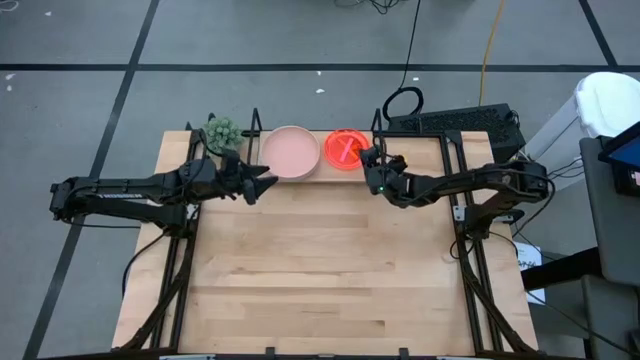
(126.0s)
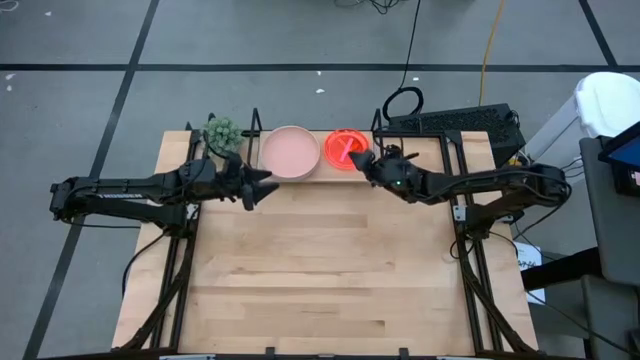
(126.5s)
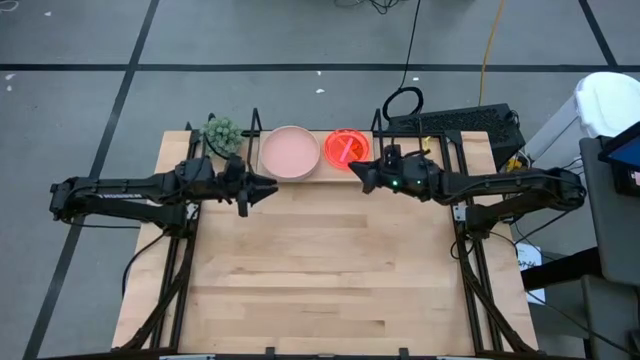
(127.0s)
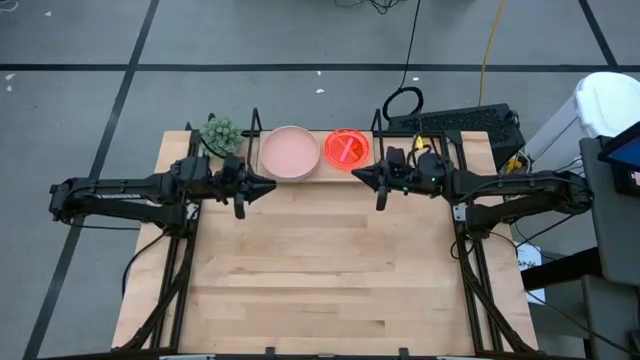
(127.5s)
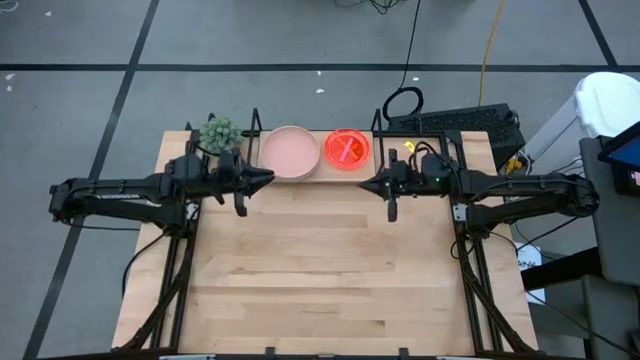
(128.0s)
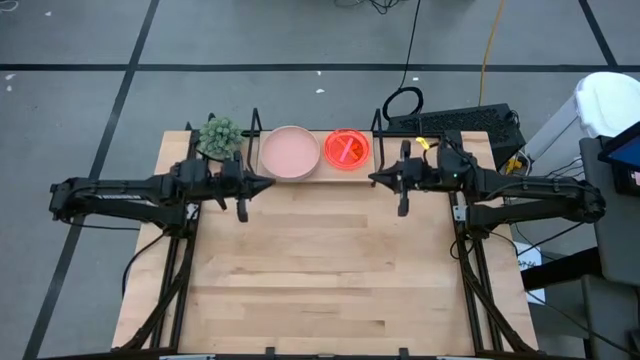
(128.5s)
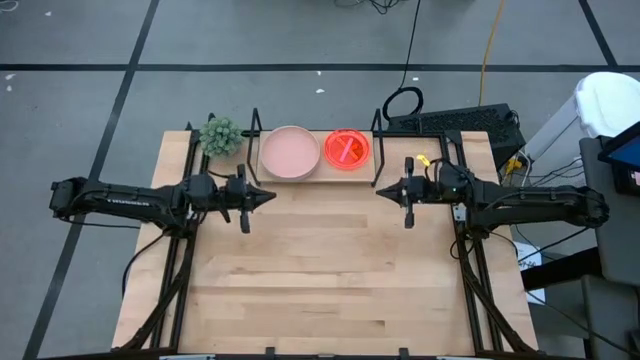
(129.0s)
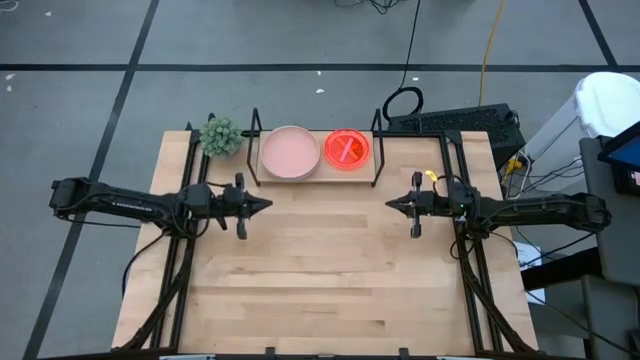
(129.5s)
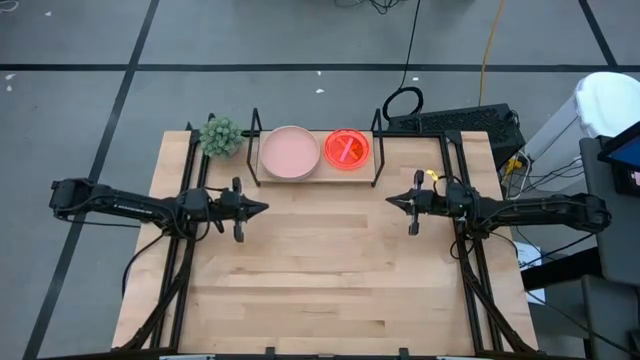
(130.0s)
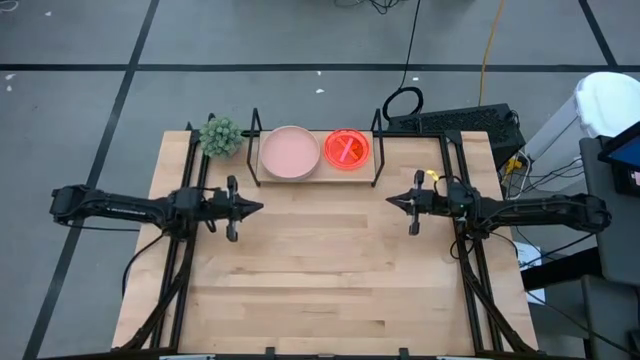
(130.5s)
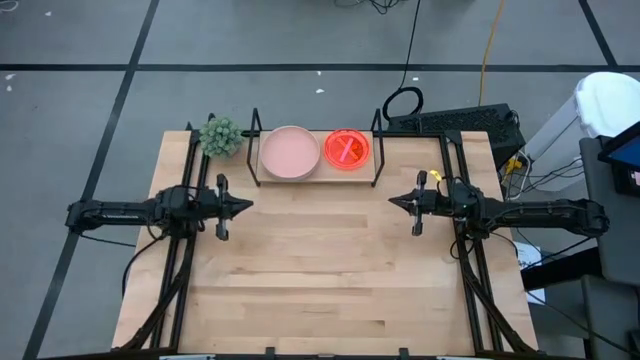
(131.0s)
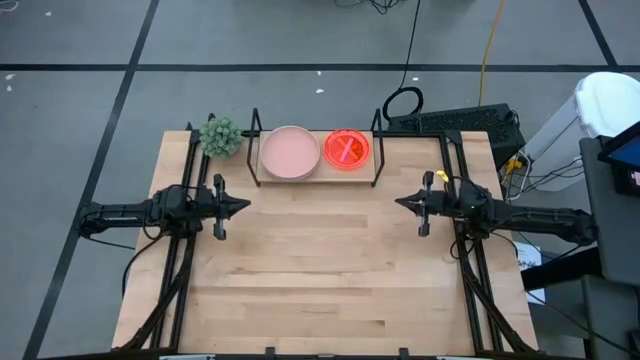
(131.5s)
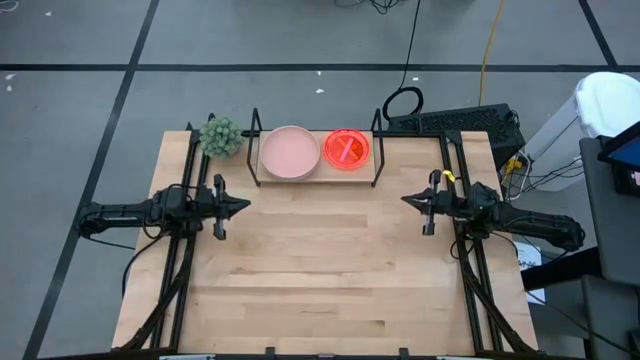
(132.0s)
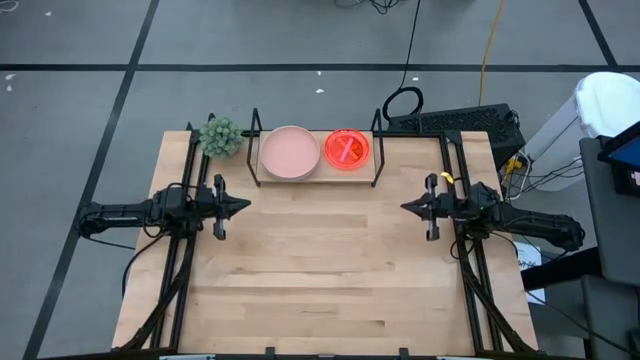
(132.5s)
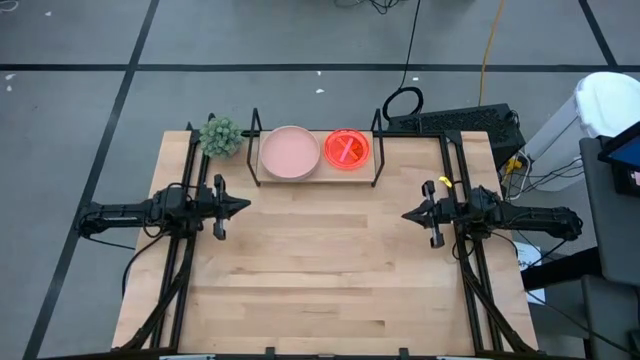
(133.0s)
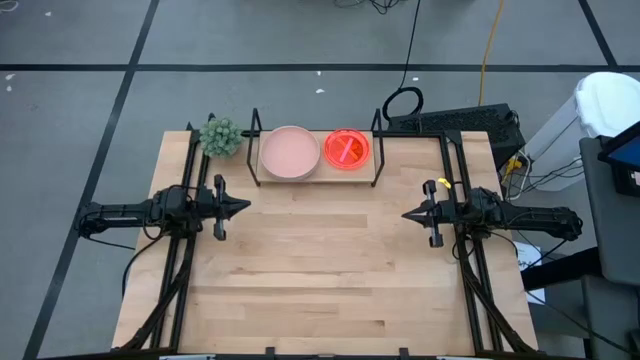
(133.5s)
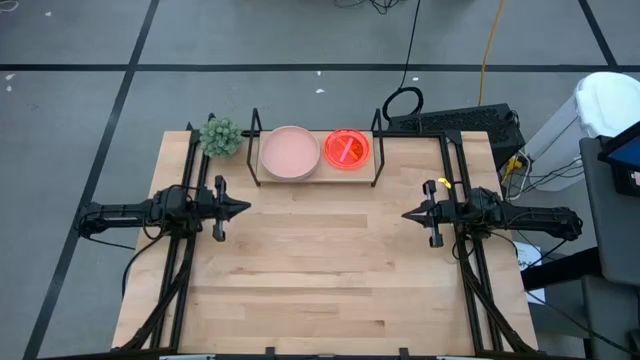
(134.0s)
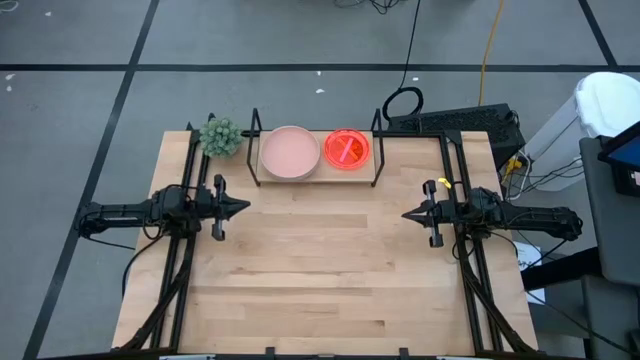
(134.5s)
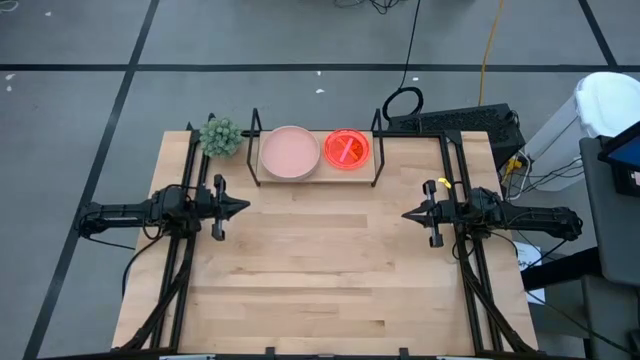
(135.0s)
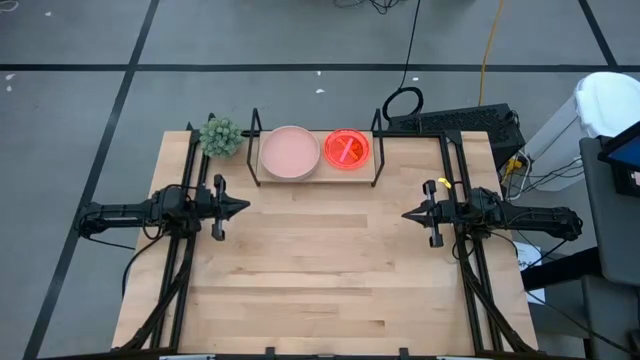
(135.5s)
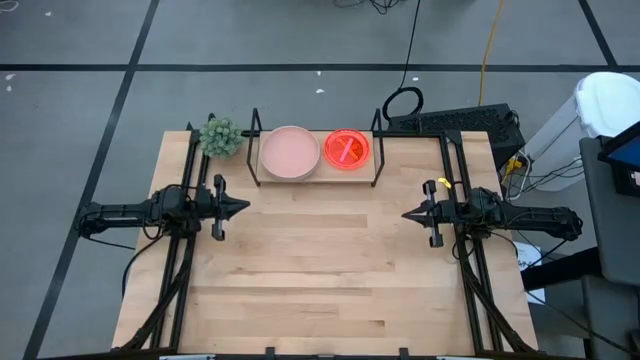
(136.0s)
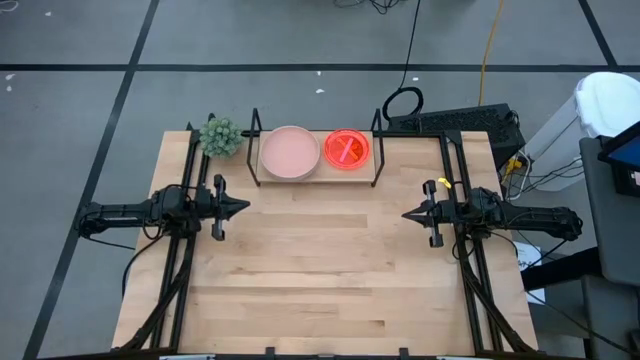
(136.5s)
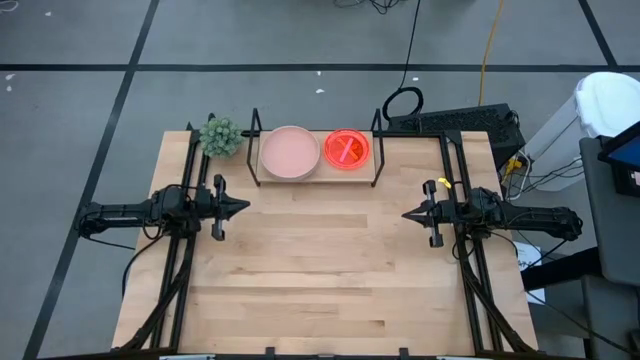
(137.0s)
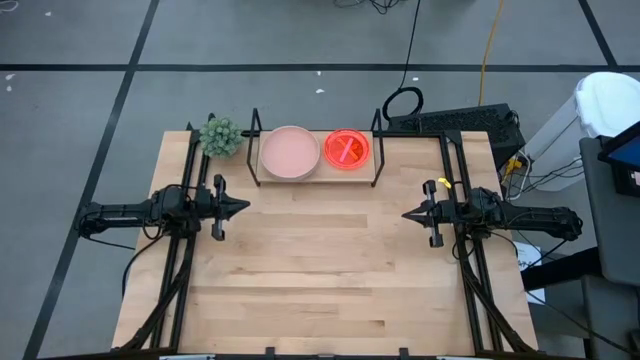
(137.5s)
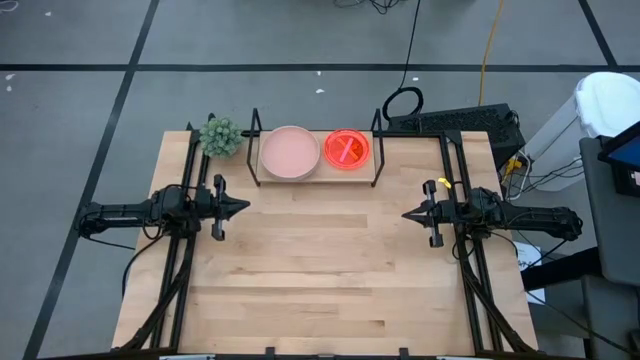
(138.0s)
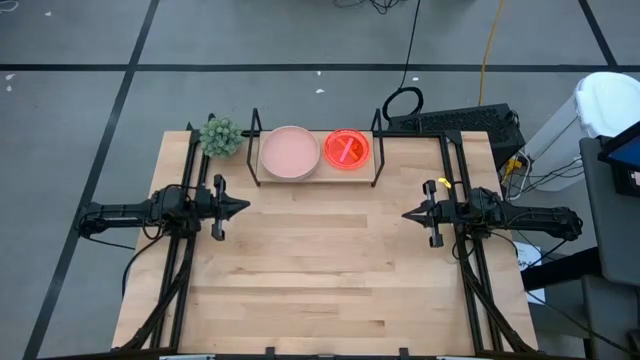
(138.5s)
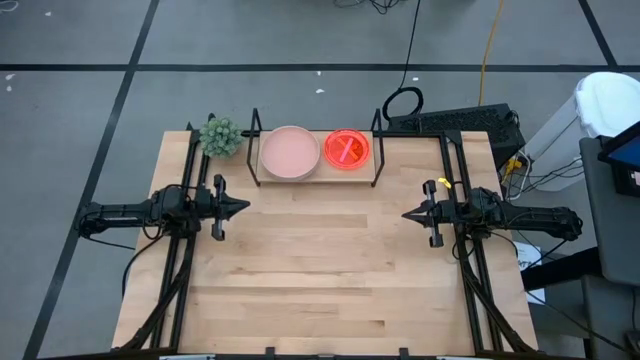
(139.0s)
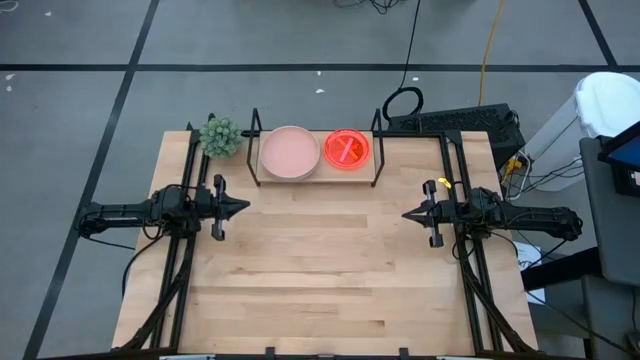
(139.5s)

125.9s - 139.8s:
Task: Place and stack plates onto a shelf
Return to Home Position
